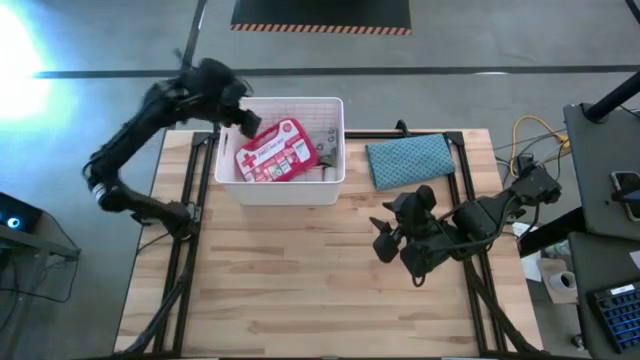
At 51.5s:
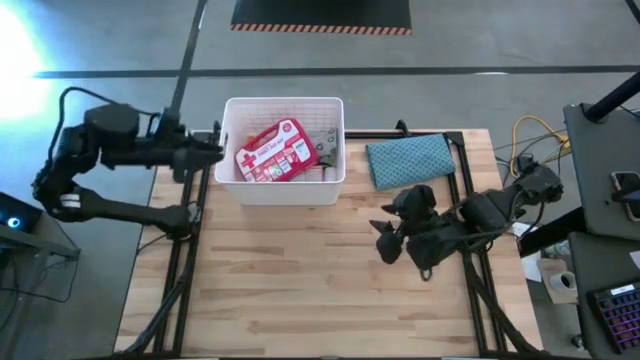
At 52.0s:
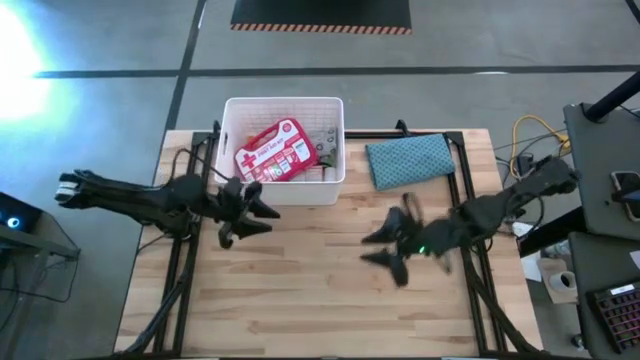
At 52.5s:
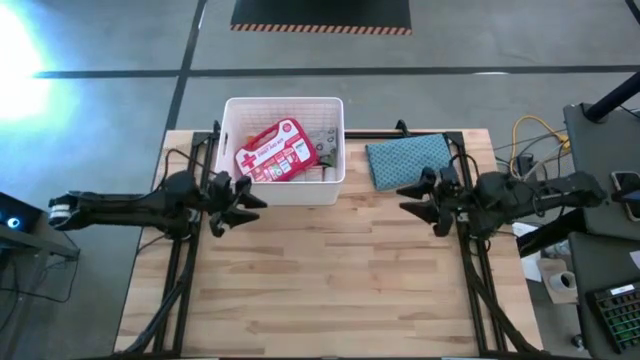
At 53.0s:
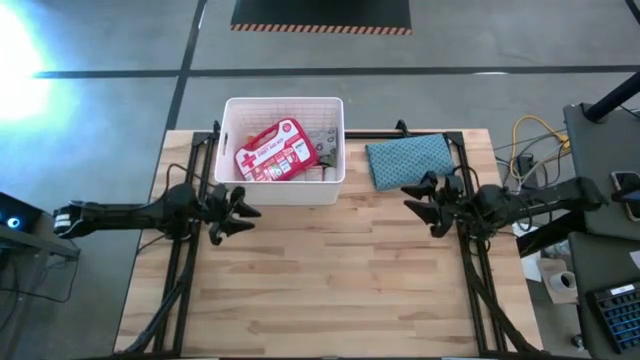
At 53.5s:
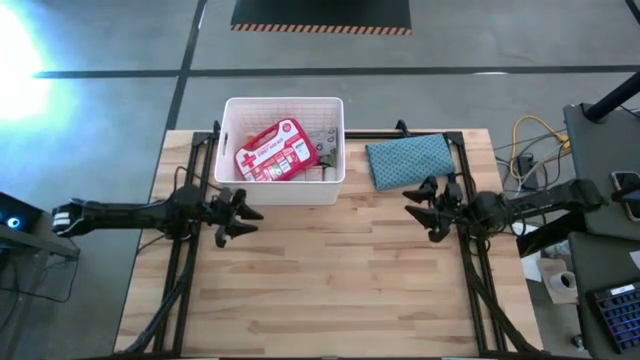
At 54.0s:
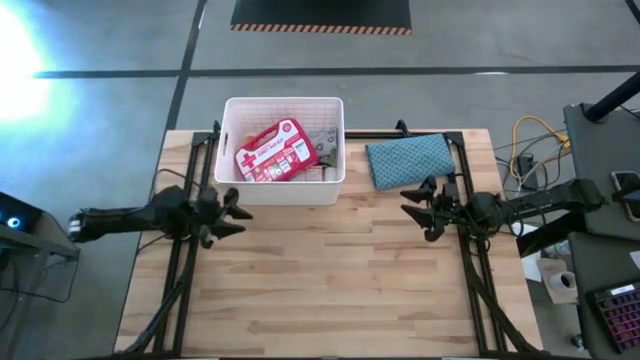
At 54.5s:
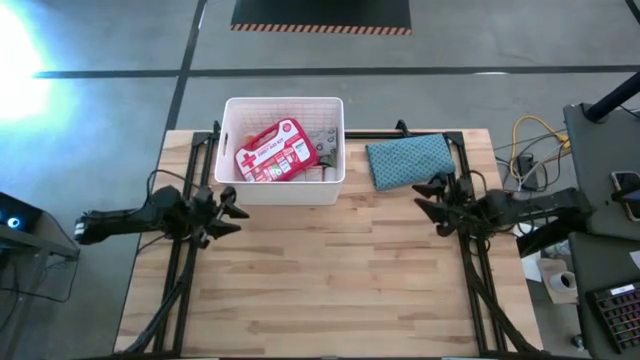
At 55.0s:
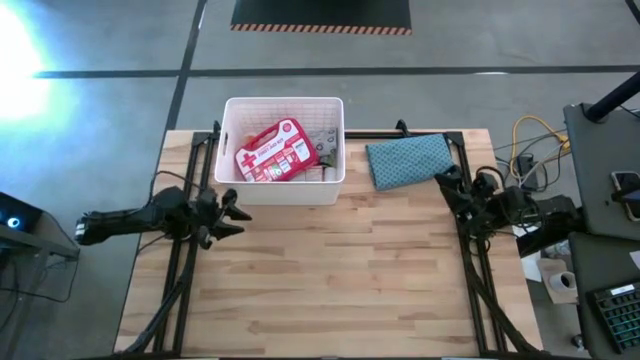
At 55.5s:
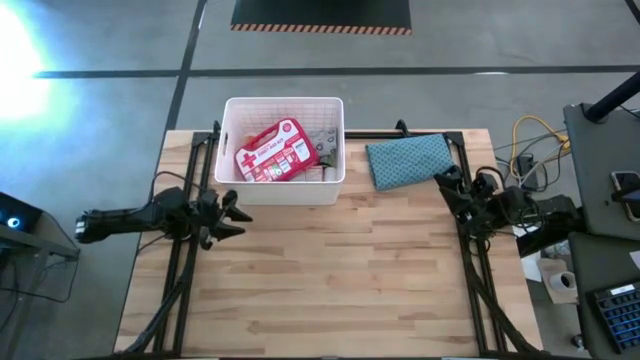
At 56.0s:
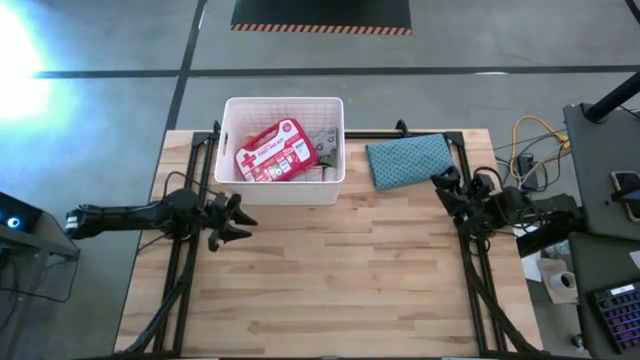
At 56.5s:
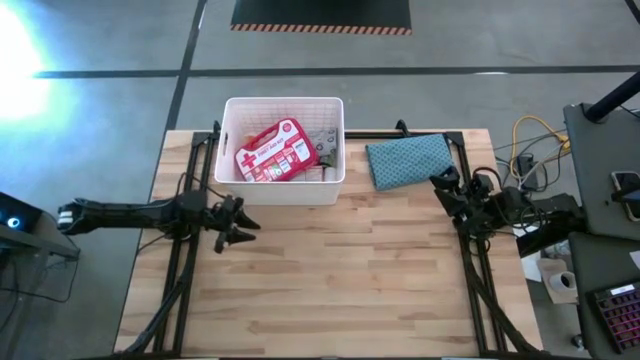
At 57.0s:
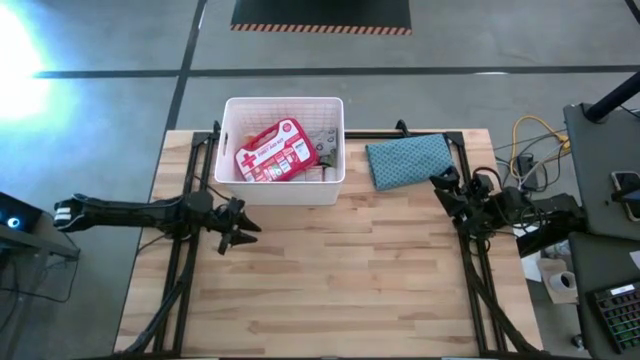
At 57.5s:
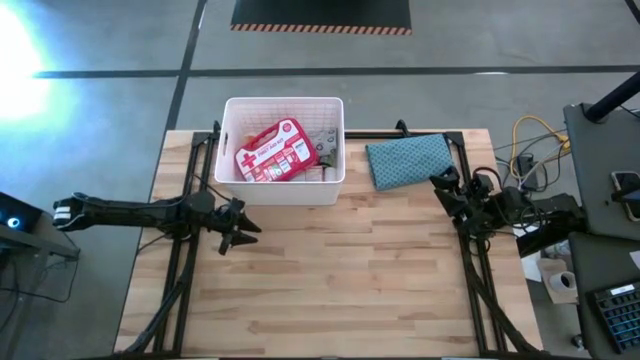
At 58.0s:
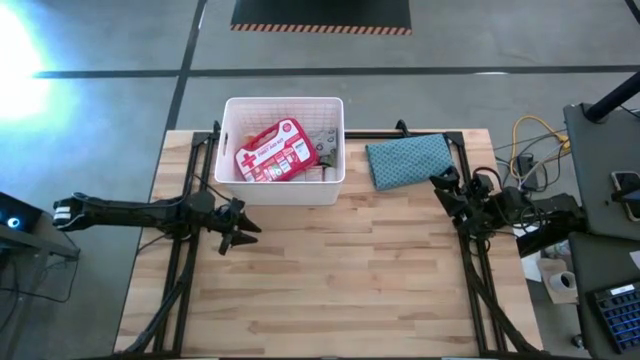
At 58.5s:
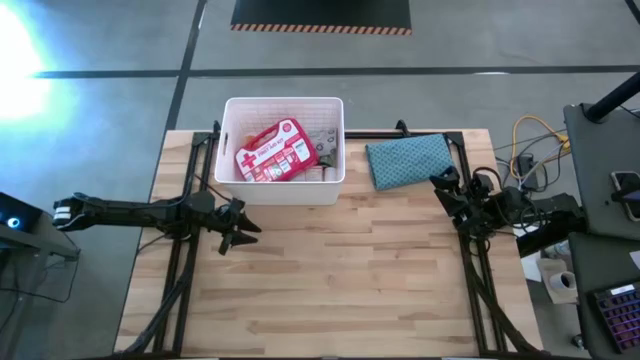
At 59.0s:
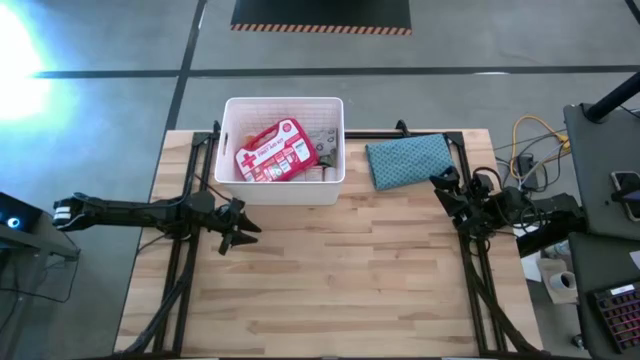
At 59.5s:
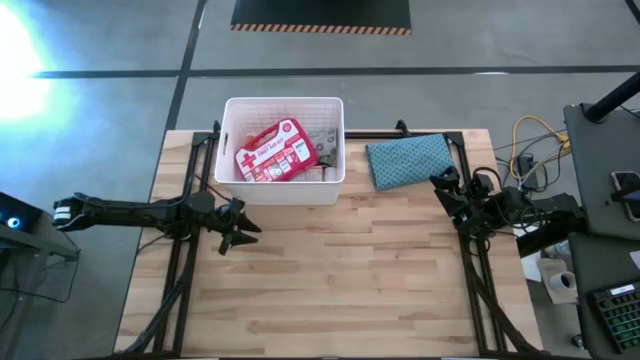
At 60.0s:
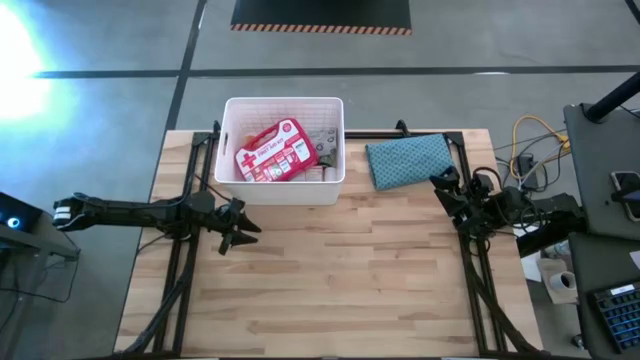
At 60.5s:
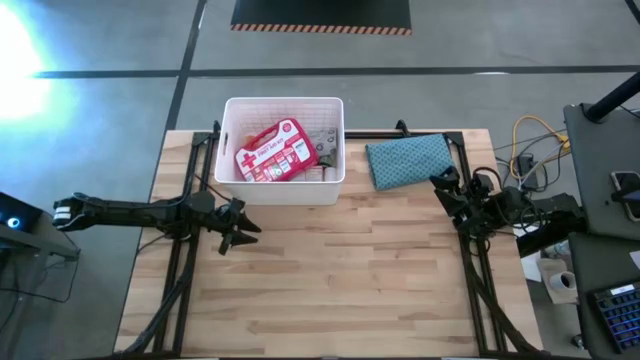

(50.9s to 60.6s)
Task: Pick & place medical supplies in basket/bin
Return to Home Position

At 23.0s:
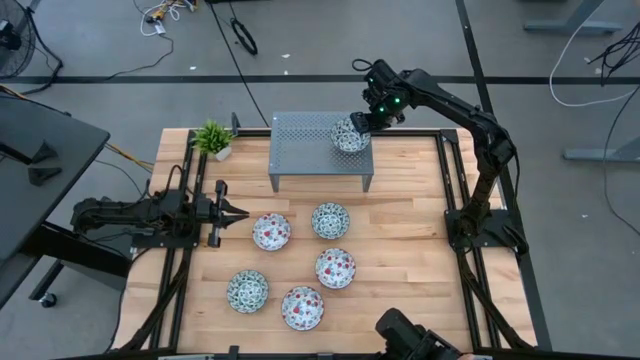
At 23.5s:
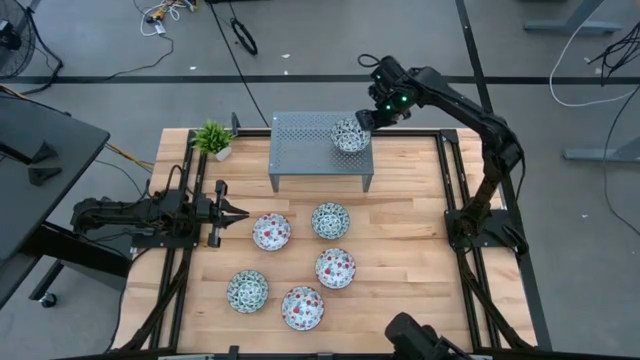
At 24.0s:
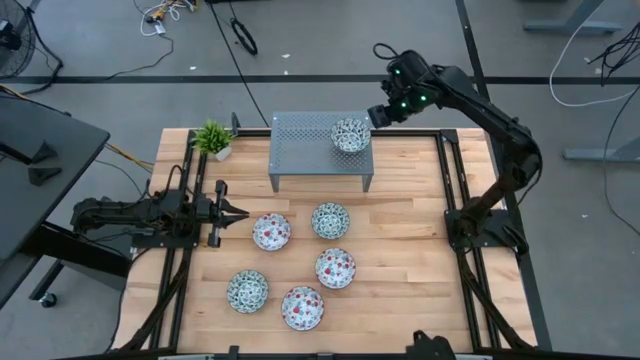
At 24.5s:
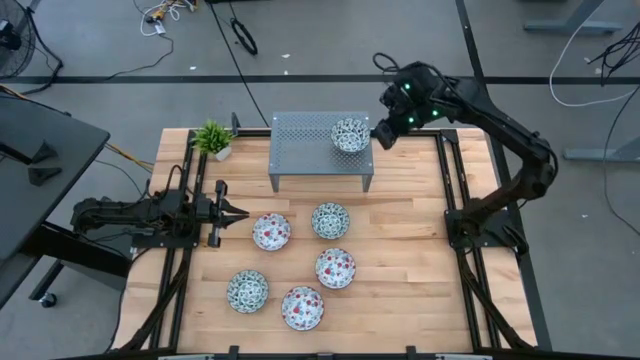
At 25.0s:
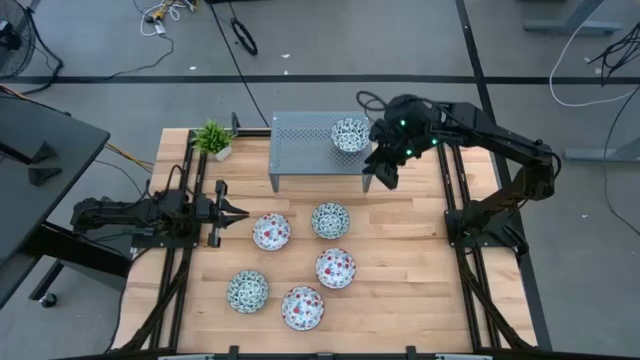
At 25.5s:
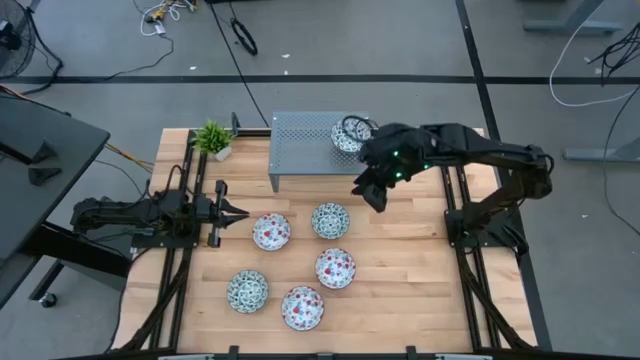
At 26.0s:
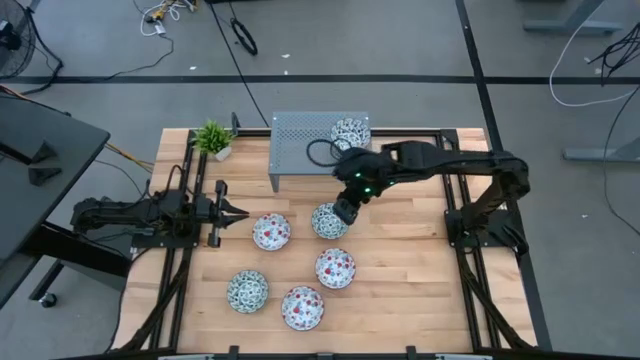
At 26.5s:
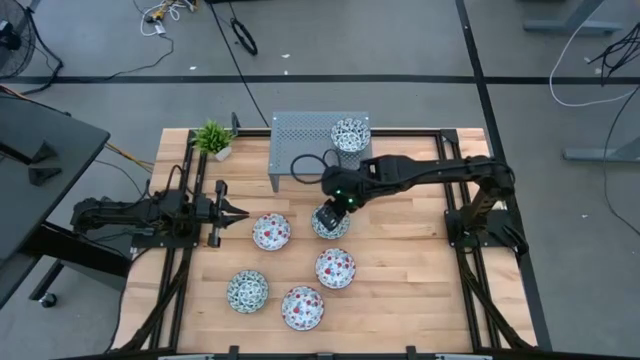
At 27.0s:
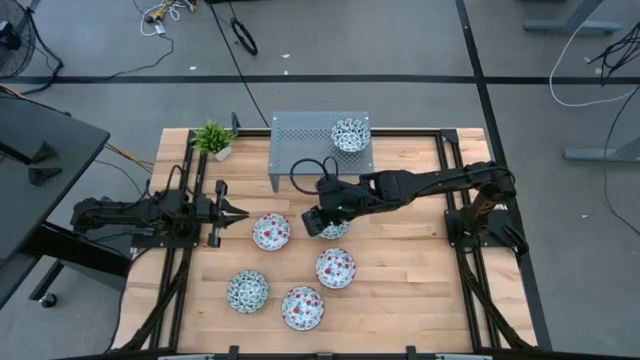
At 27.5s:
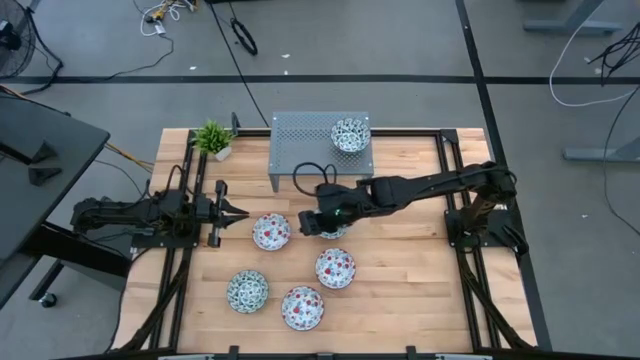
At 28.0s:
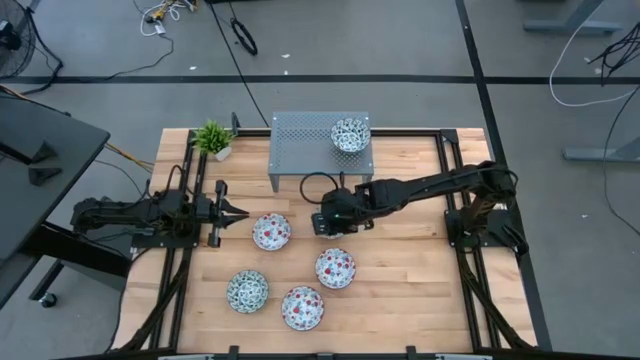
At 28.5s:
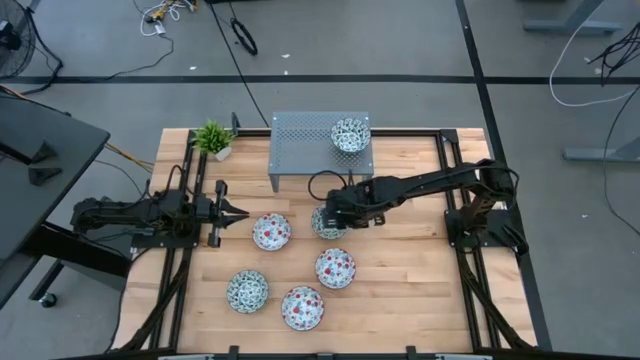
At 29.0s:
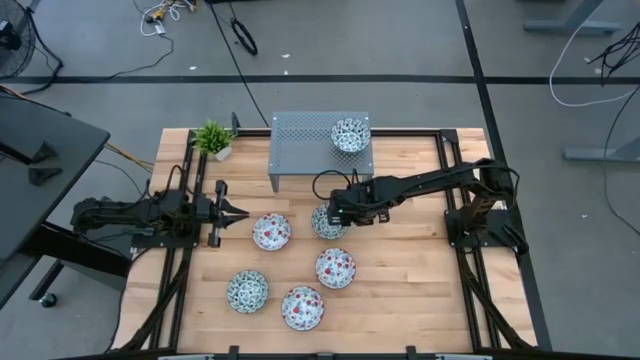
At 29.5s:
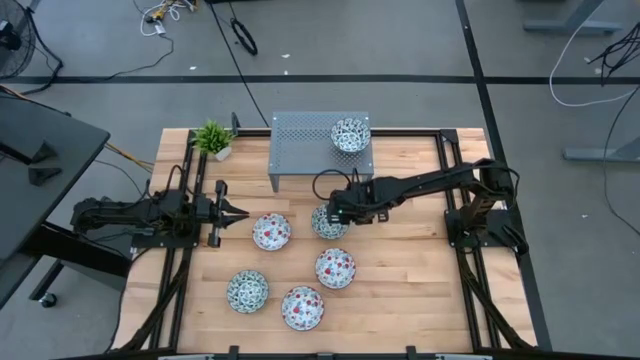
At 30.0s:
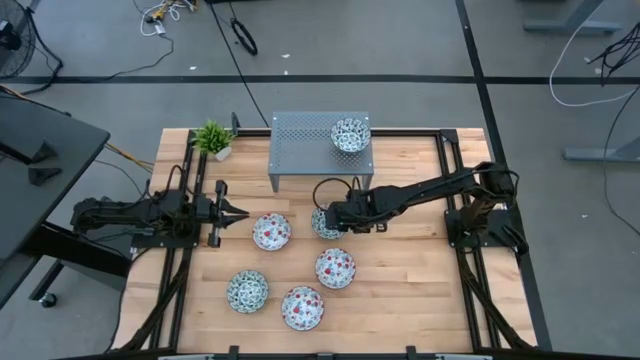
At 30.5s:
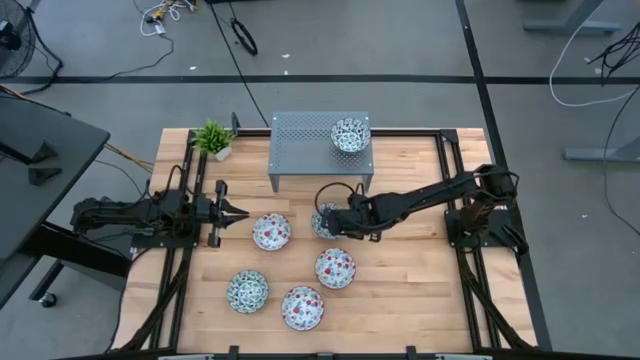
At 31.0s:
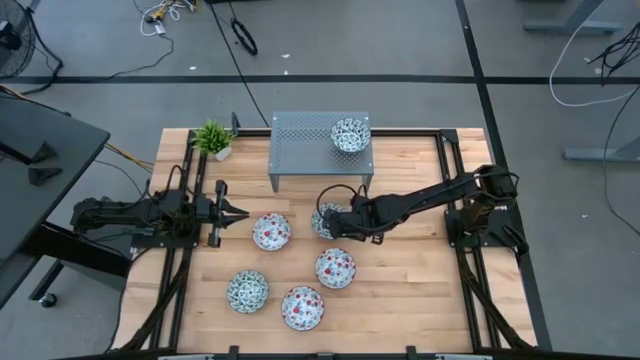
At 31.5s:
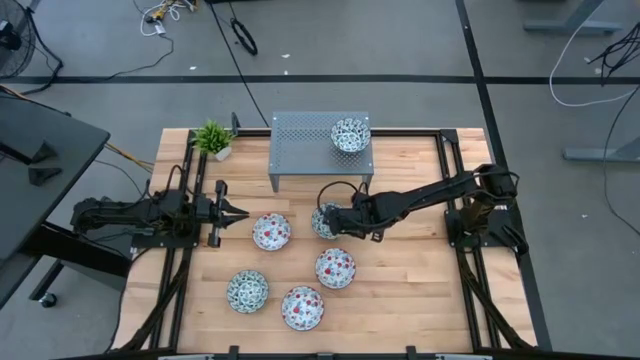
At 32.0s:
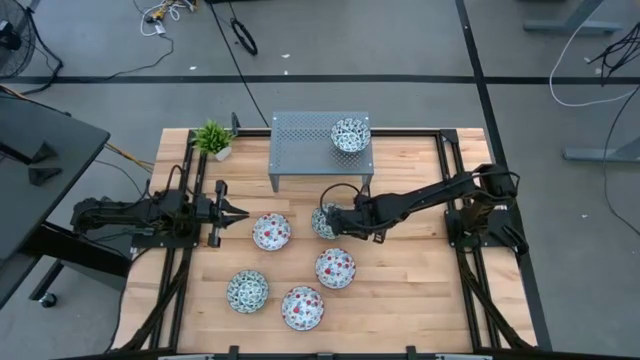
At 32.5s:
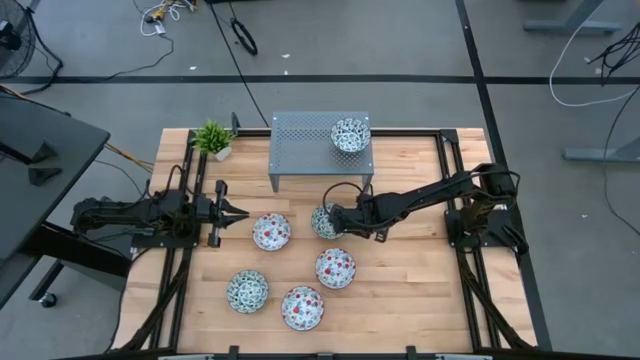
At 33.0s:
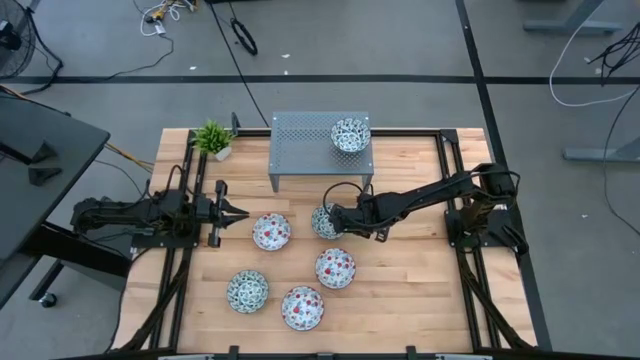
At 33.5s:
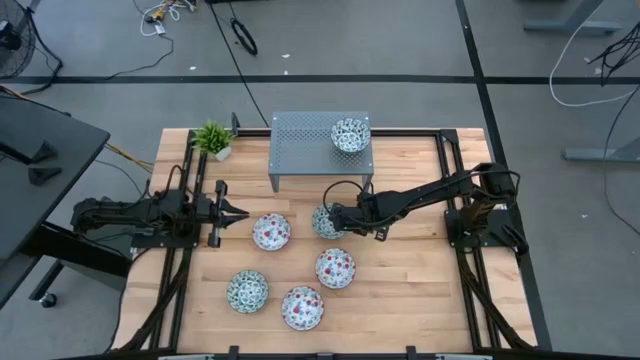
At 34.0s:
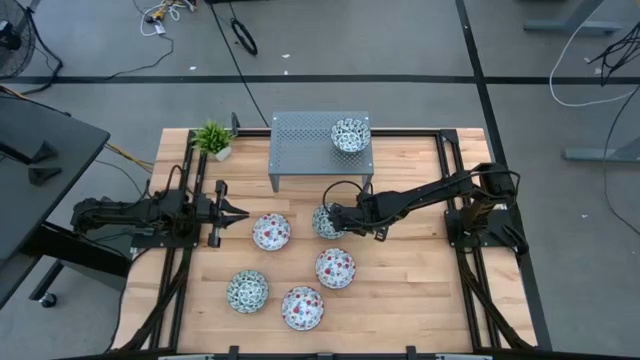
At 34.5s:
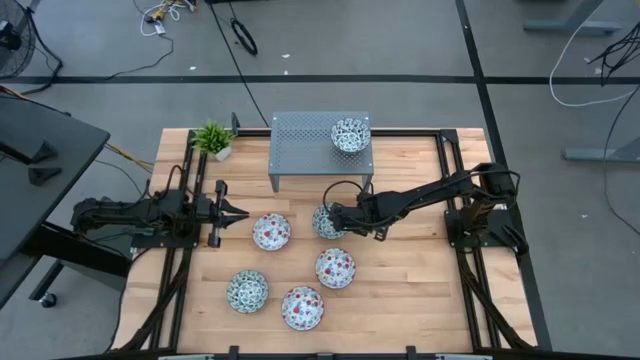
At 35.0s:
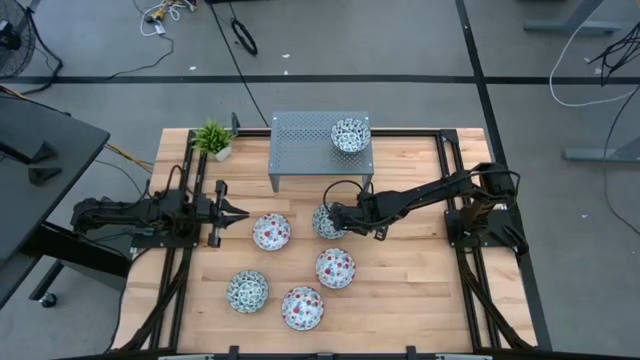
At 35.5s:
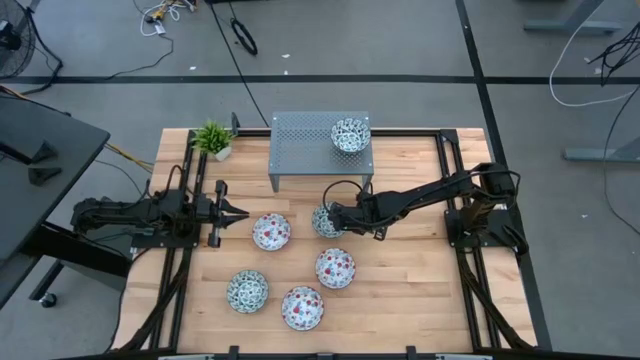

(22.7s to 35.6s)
Task: Pick & Place Mini bowls
Stack the top blue and white patterned bowl on top of the other blue and white patterned bowl on the shelf
